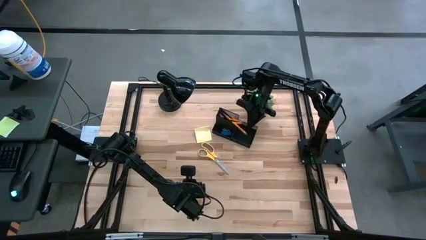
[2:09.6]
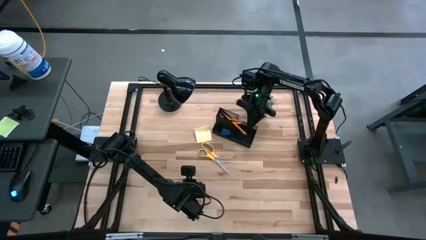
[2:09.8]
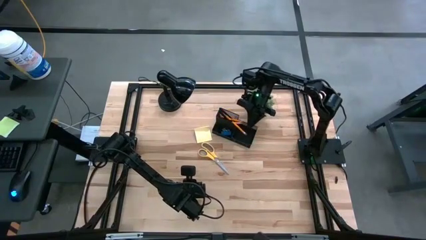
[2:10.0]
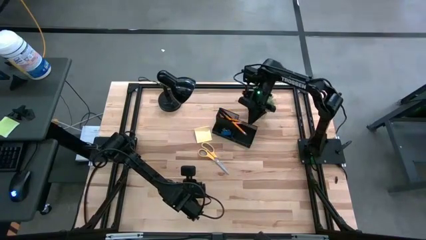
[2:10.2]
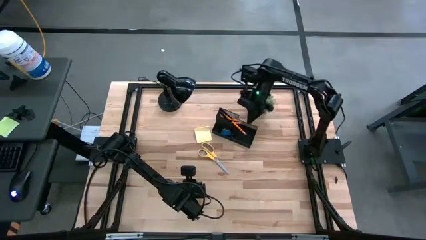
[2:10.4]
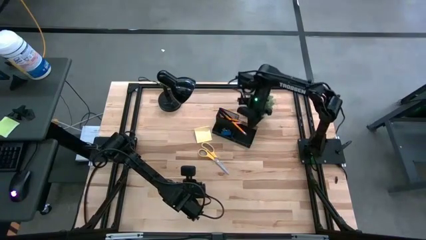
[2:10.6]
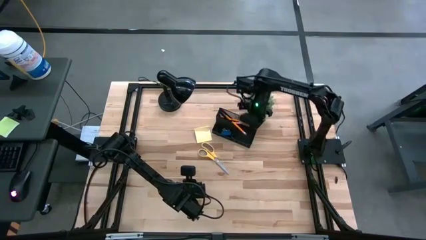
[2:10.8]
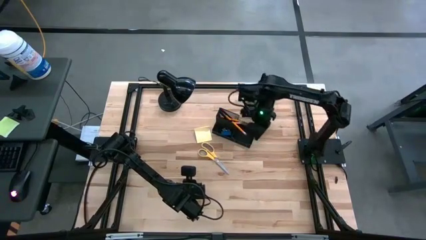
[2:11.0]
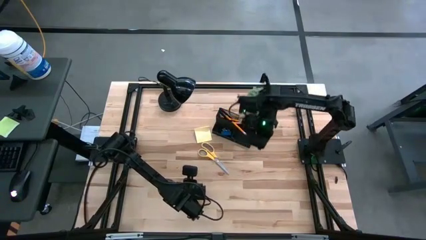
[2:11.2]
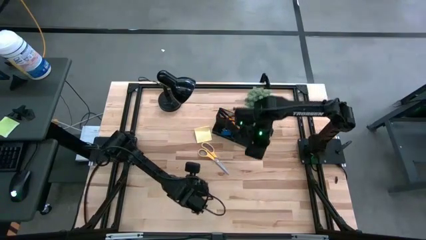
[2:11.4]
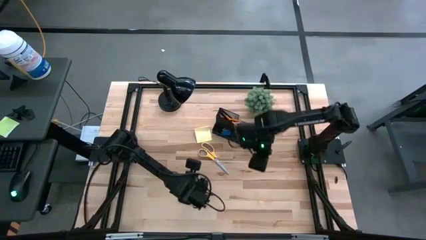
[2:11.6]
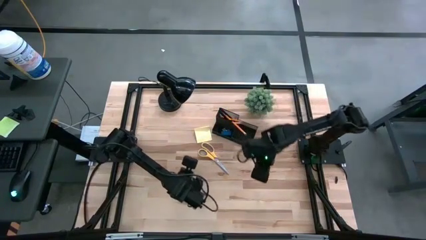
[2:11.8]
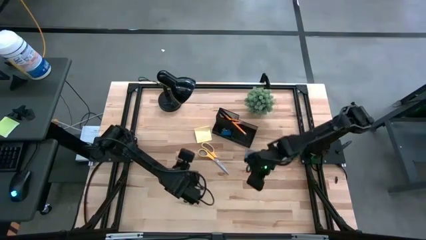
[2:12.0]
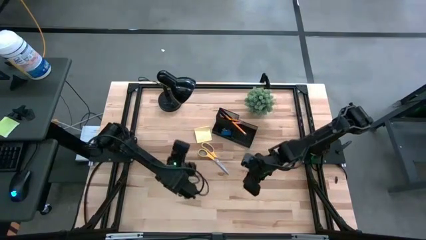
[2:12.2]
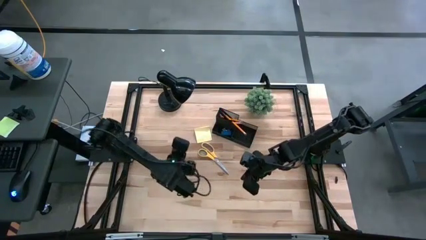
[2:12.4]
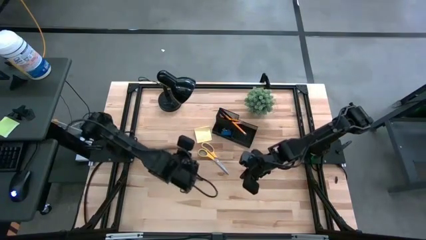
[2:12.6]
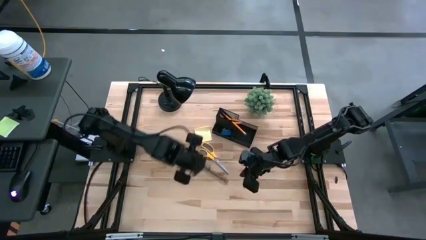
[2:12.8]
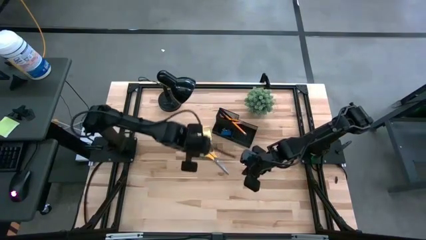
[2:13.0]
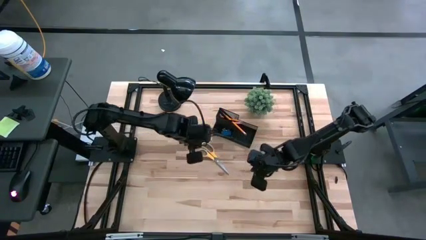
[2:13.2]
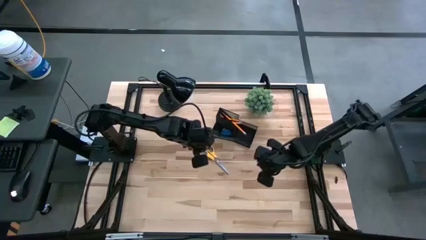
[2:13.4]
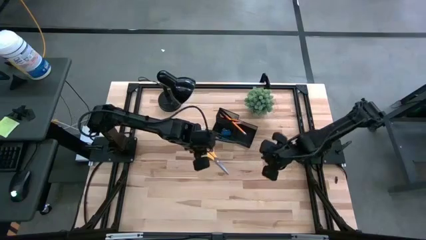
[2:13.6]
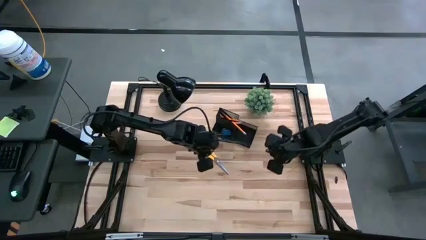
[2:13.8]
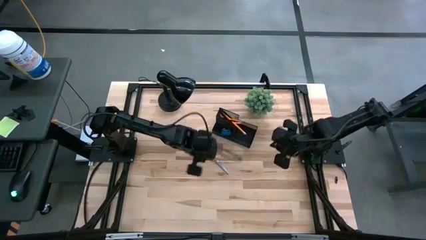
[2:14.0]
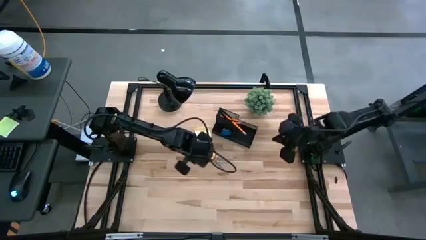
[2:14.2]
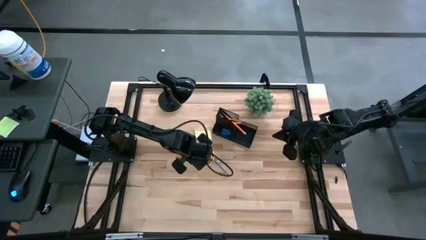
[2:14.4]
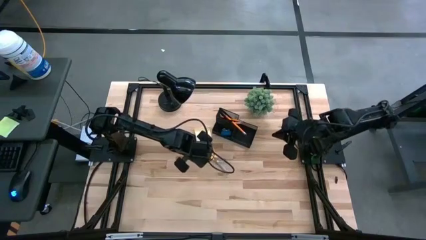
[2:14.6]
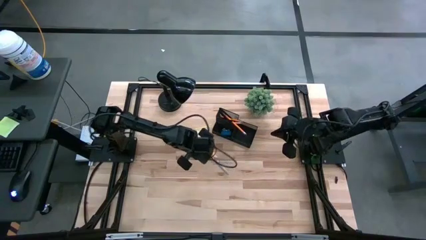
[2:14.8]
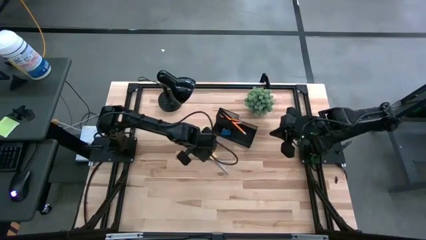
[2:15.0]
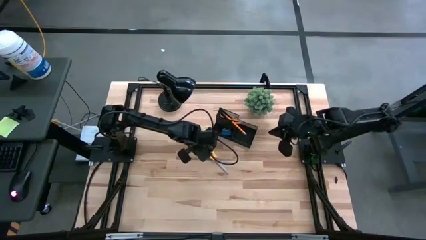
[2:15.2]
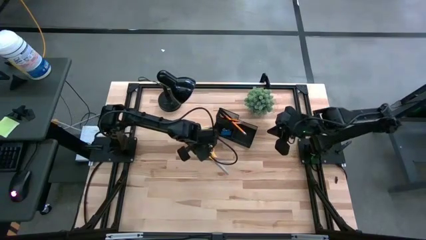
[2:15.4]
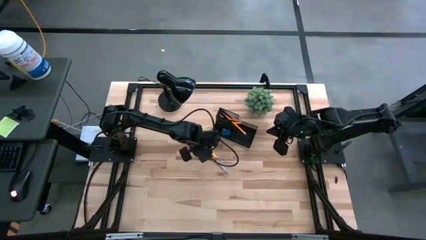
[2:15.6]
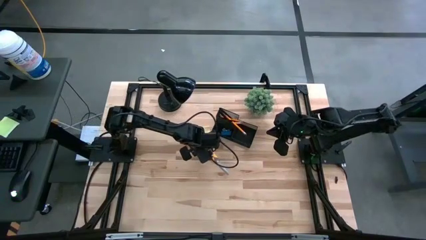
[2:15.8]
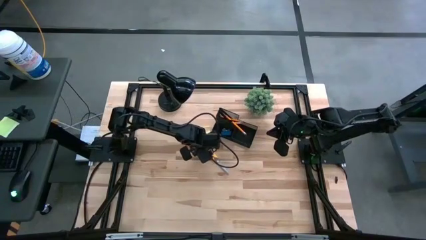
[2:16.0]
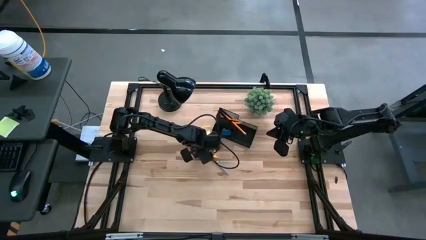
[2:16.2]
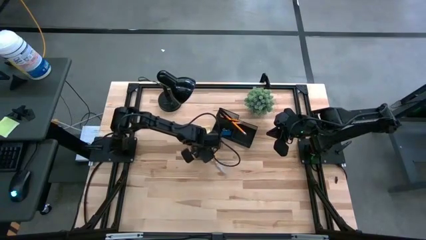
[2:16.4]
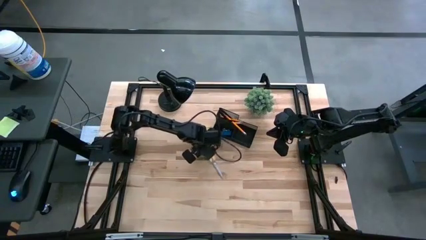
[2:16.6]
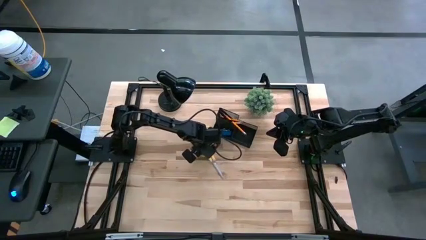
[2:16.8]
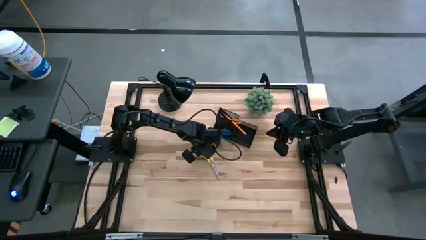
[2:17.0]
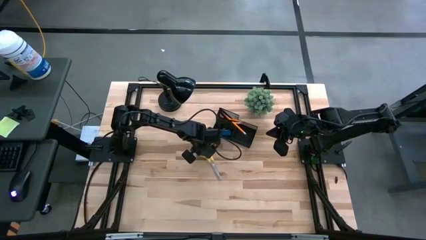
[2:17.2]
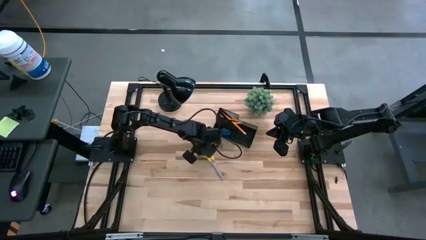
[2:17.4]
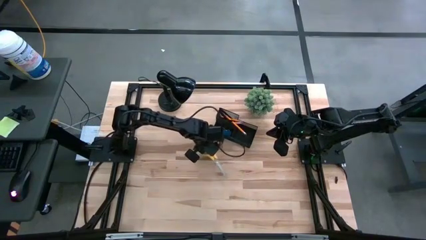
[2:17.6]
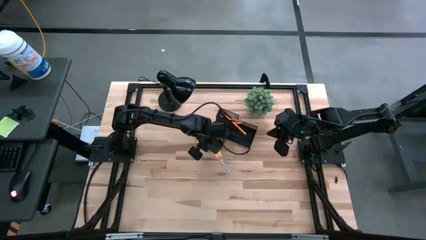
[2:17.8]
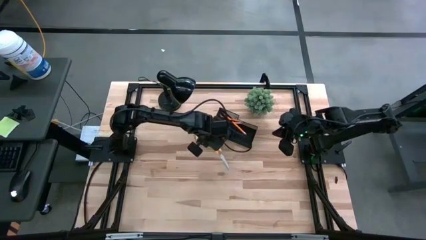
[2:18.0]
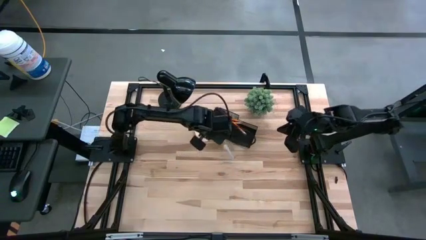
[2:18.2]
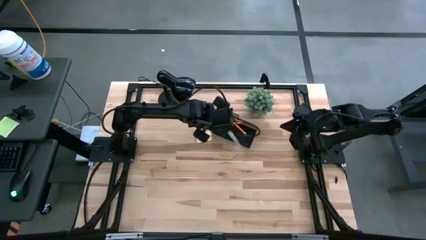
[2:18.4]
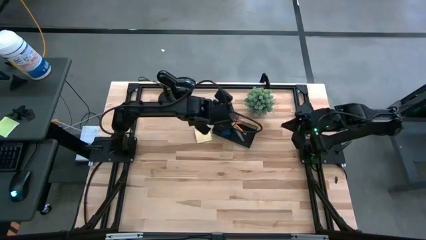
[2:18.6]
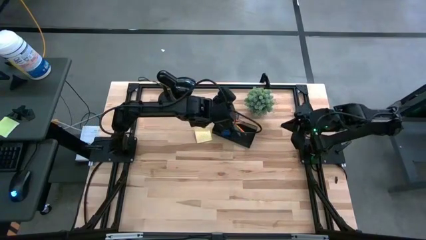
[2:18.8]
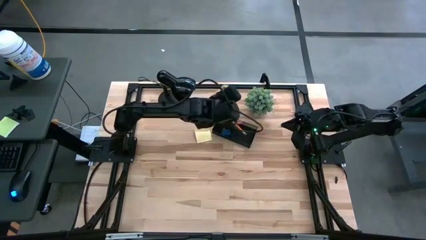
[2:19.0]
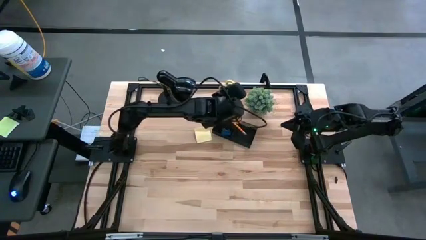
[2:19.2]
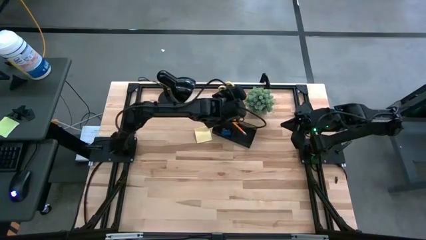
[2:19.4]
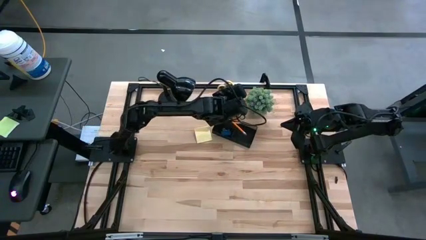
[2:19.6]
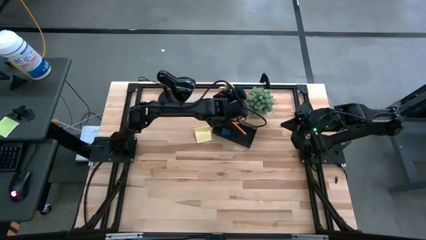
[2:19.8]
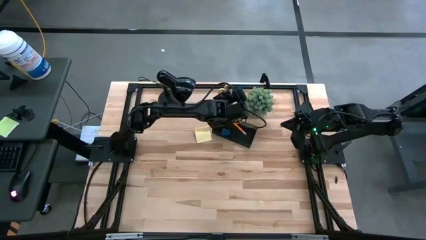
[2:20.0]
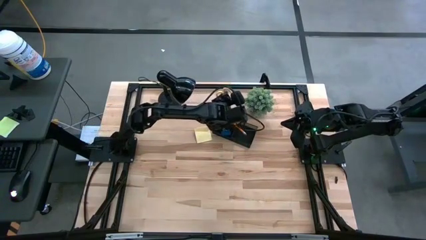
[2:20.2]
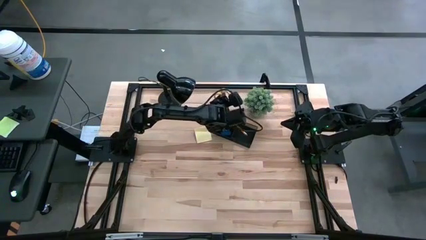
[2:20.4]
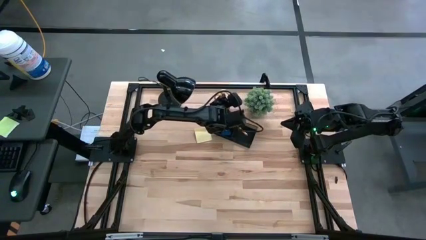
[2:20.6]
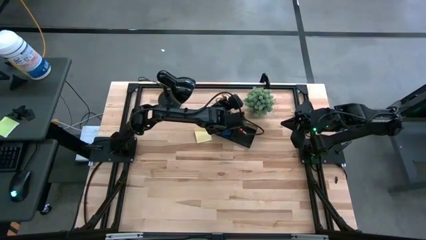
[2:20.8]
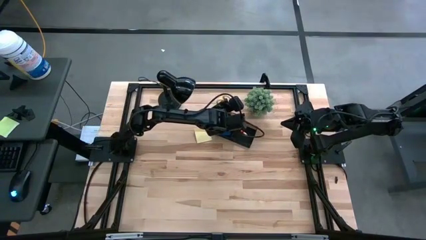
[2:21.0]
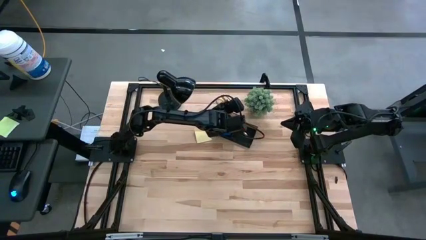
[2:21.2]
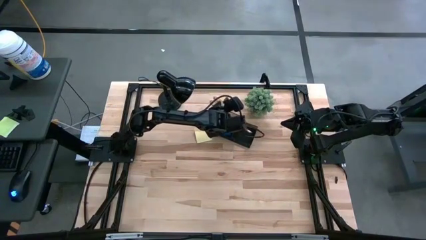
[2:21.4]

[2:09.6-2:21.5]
Task: Pick and place office supplies into organizer
Put the scissors into the desk organizer

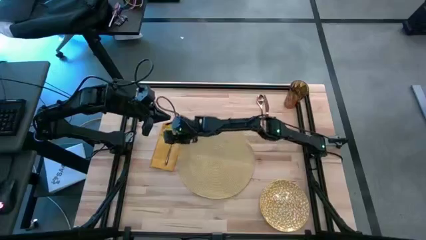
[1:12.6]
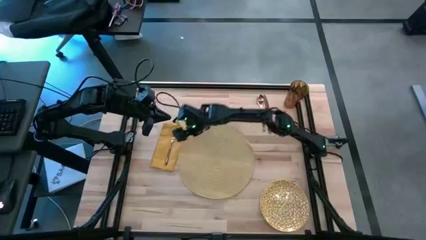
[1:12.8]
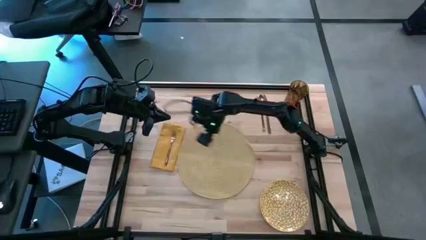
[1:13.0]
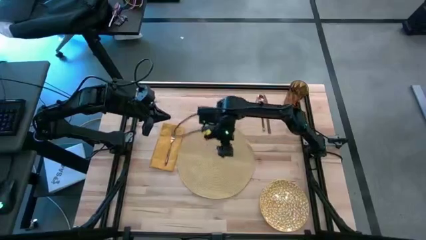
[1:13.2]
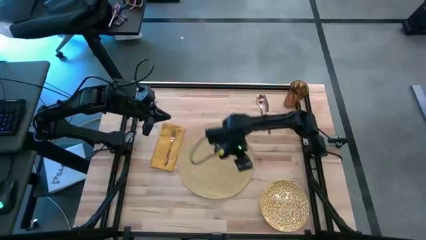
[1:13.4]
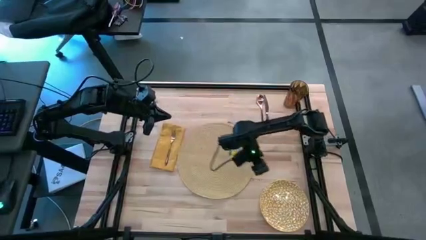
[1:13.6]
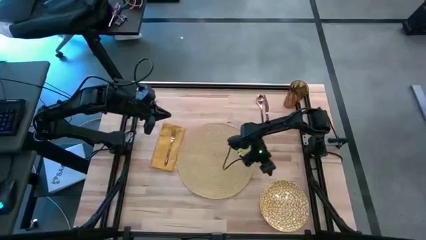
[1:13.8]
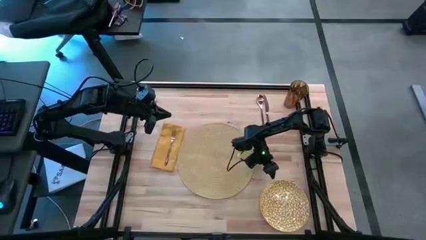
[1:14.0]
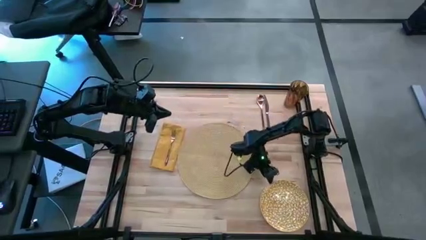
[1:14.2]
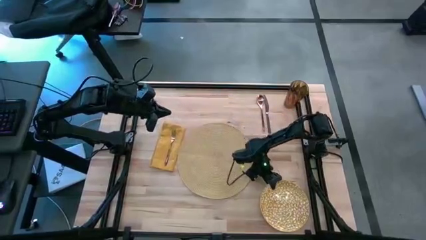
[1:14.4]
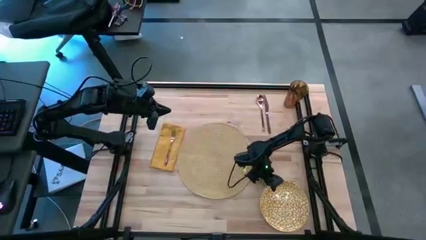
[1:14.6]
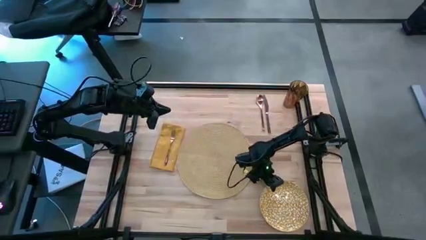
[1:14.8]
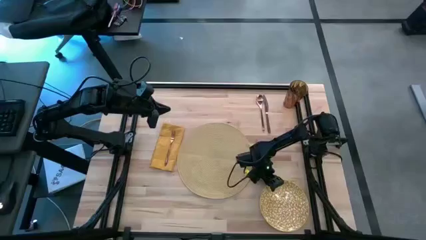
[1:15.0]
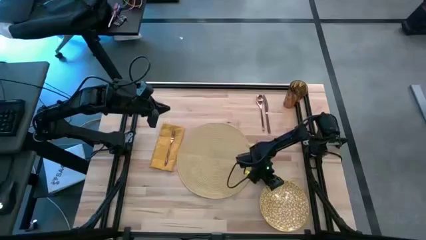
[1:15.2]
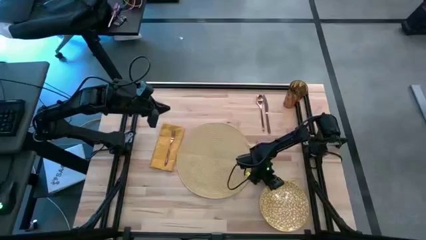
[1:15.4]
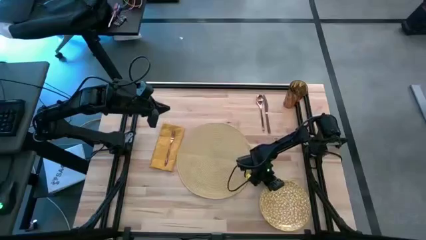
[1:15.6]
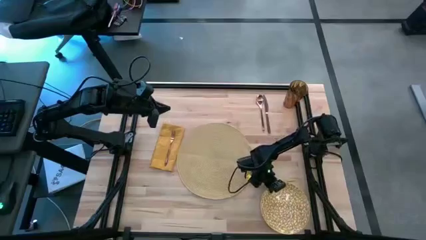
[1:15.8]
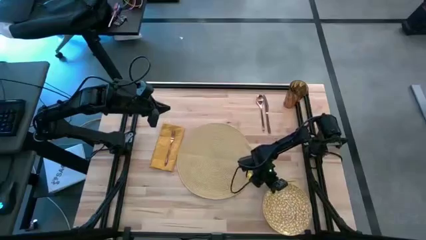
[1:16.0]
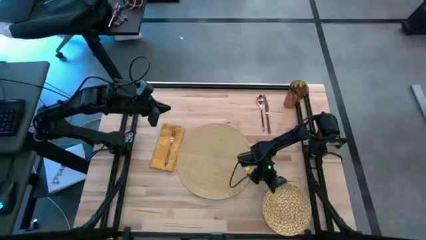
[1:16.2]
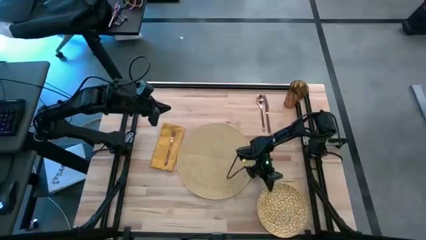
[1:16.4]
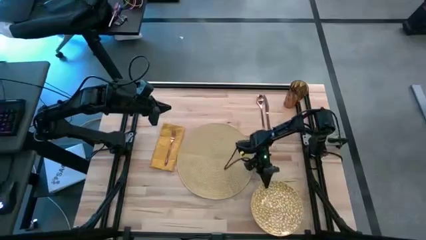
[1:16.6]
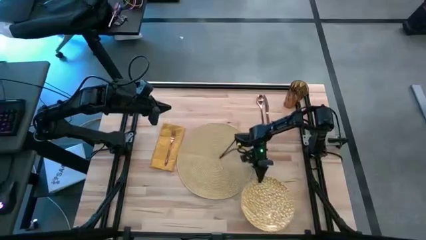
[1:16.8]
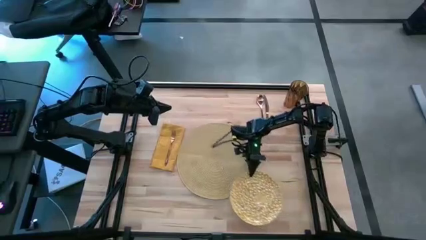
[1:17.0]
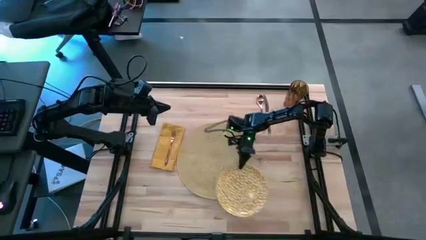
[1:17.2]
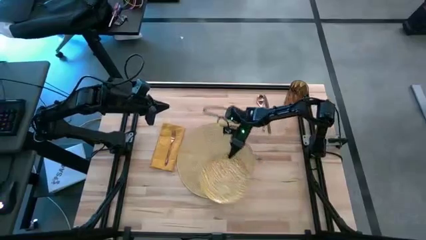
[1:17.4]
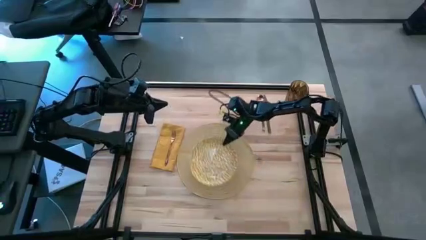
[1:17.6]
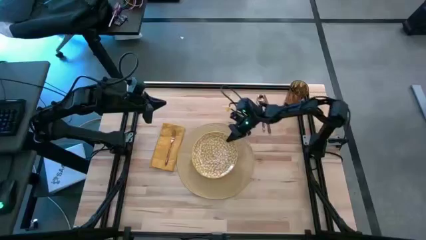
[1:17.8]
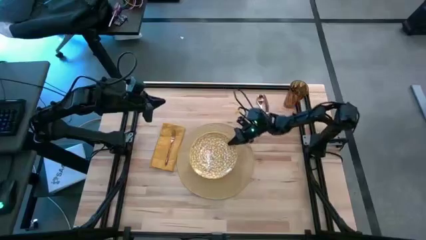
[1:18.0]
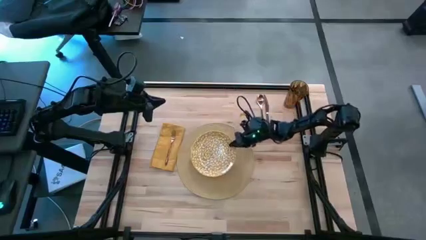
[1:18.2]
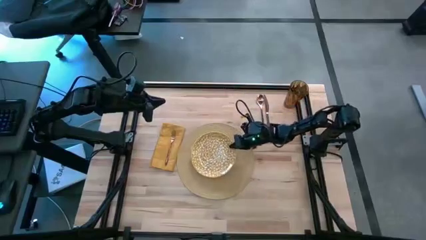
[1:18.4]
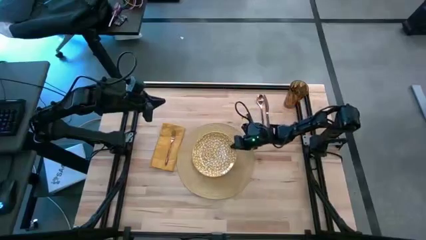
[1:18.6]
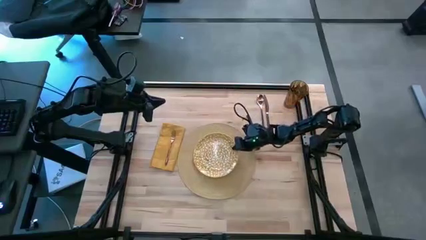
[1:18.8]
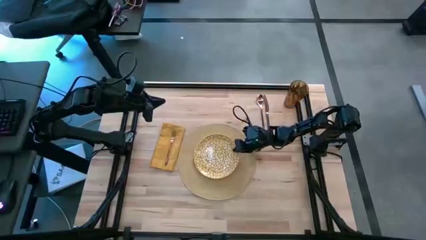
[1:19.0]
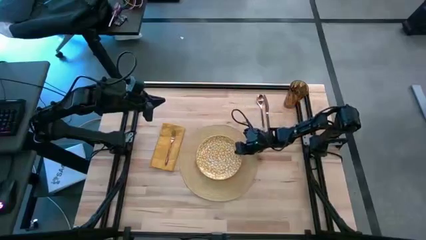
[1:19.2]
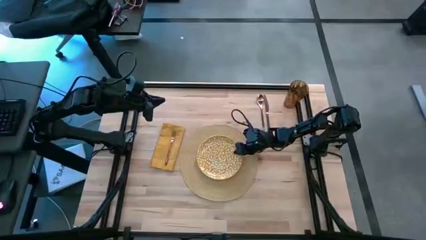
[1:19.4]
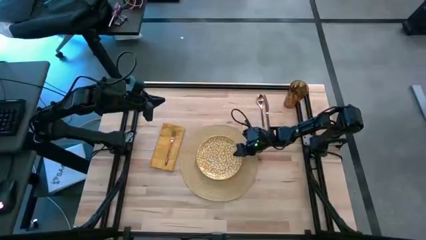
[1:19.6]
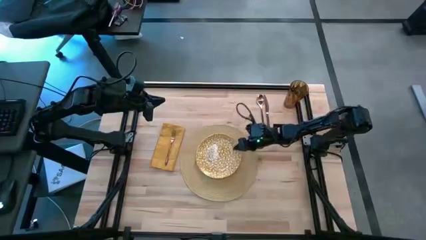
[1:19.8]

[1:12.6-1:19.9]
Task: Set table place
Put the yellow plate on the brown placemat
